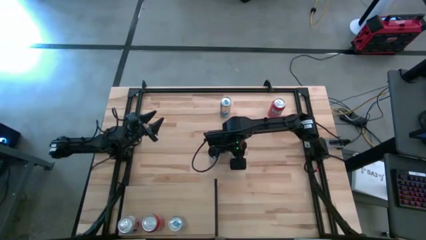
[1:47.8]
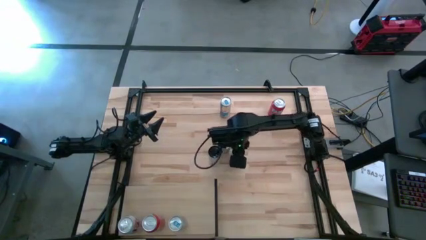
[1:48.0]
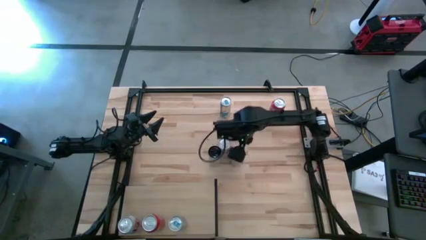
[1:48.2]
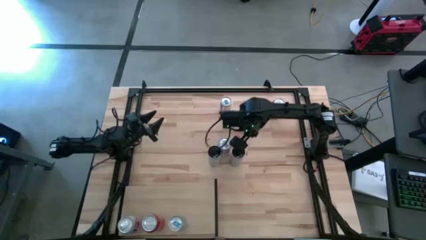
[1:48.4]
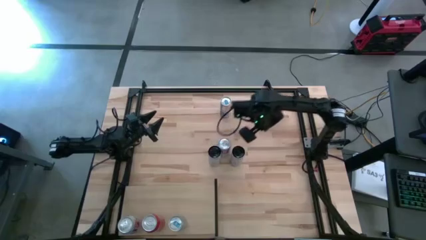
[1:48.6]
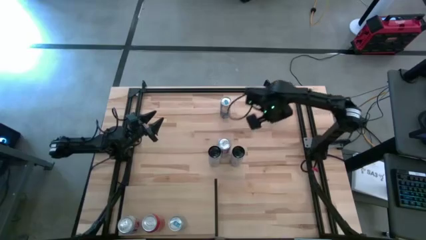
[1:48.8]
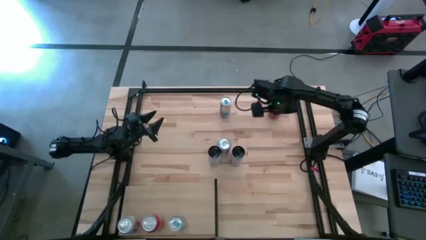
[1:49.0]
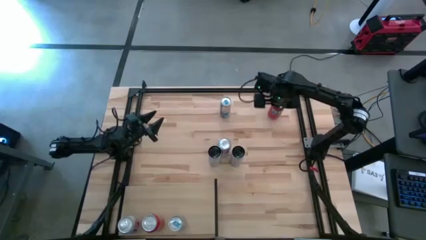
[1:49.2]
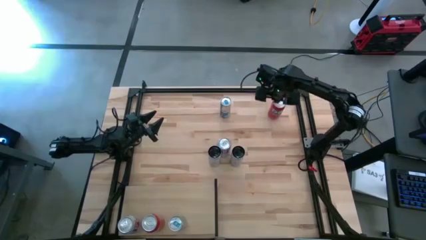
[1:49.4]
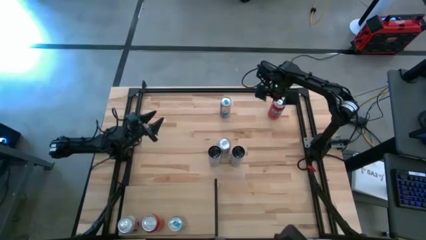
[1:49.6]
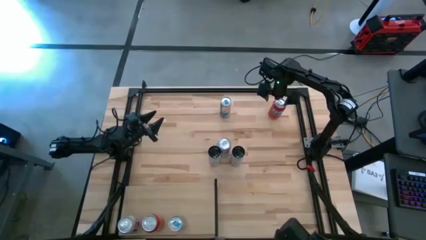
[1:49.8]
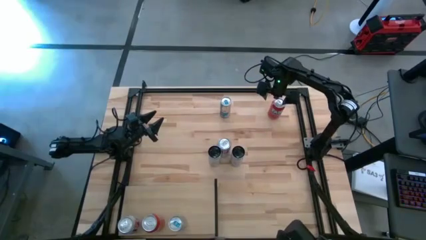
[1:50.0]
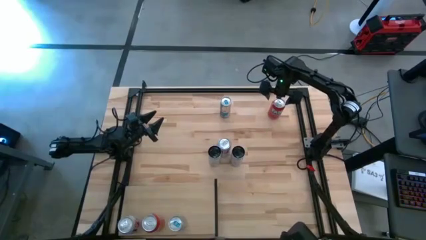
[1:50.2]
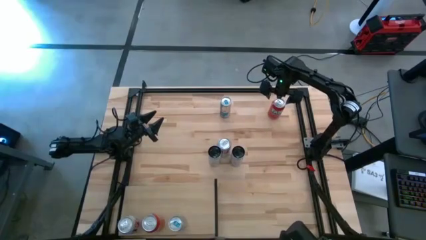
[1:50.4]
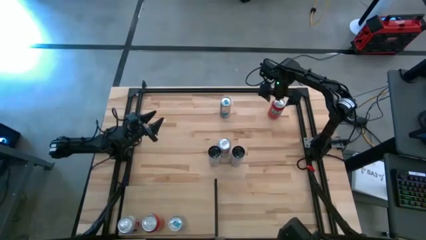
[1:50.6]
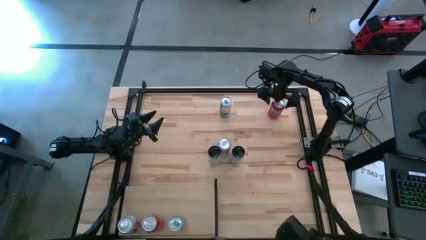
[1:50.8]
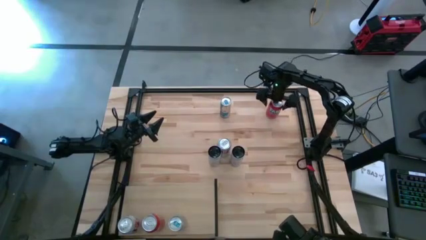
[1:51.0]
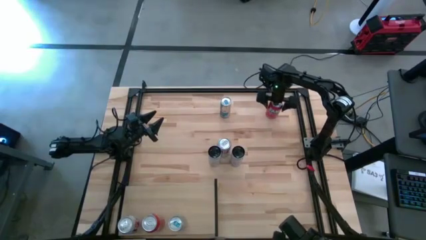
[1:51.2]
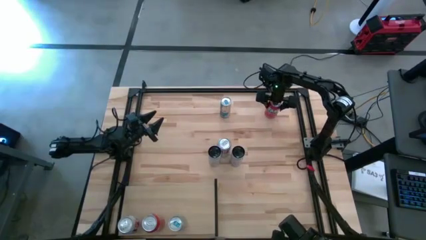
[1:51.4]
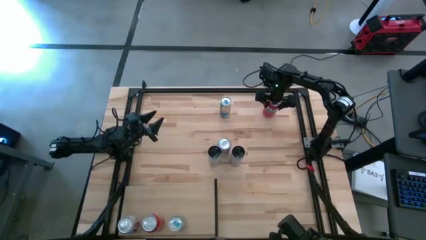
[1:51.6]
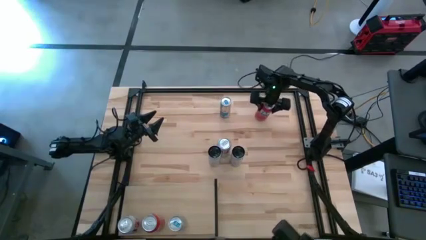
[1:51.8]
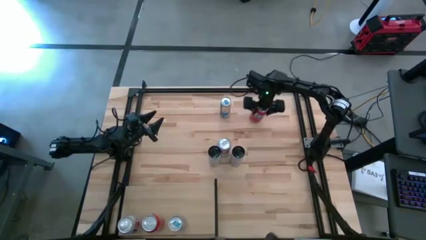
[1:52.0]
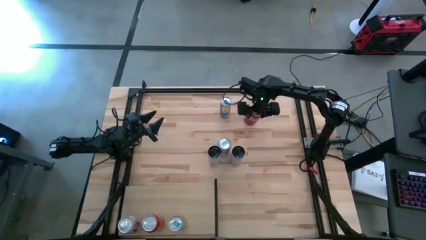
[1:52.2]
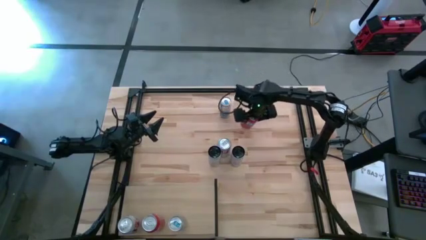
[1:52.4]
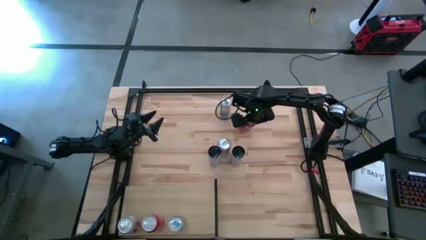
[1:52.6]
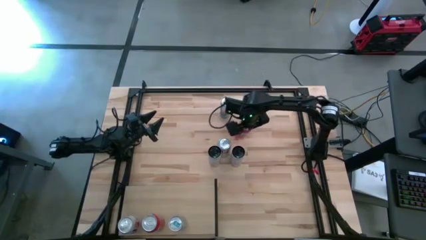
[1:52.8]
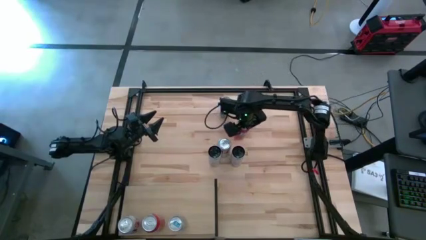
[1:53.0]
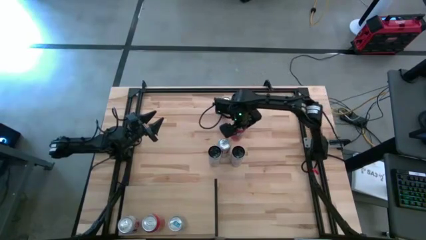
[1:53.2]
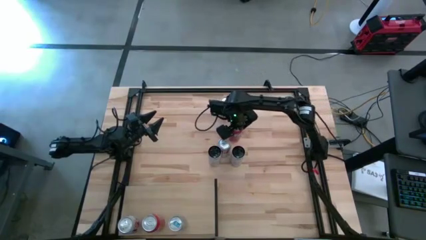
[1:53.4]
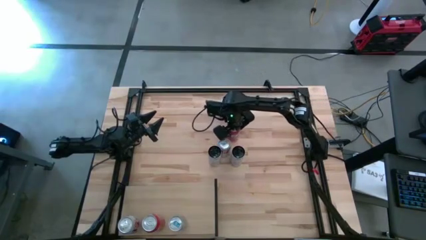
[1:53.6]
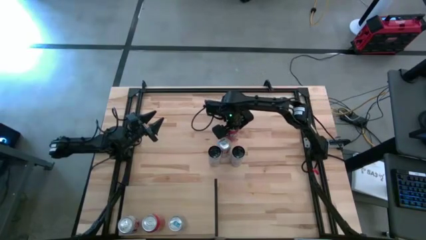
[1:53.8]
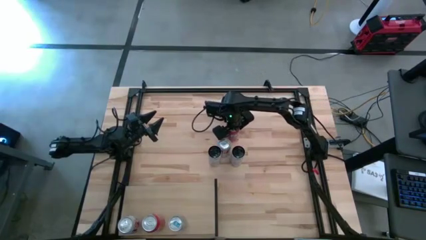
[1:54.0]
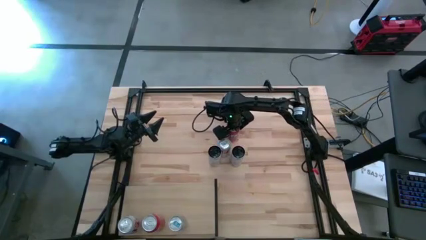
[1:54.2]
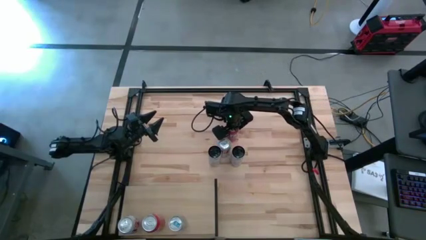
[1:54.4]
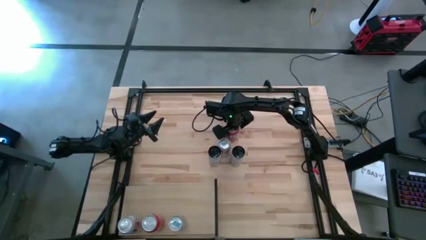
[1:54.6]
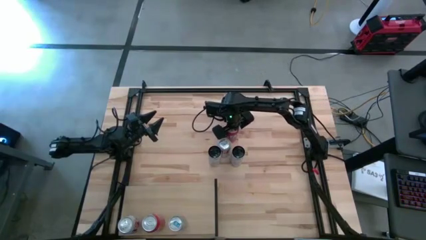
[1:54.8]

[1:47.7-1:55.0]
Task: Place canned beverage on shelf
Move the orange soda can to the center of the table

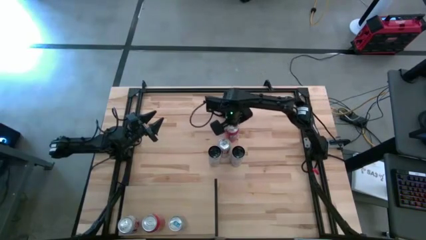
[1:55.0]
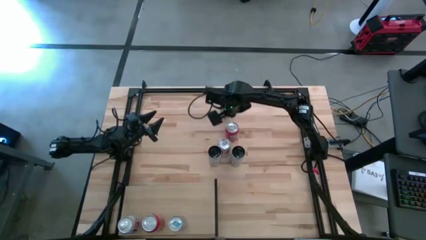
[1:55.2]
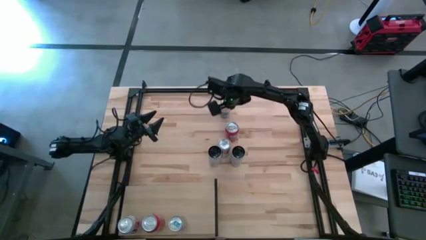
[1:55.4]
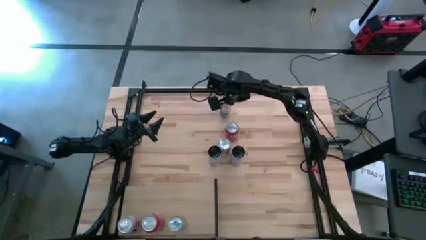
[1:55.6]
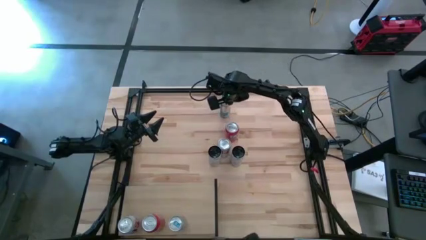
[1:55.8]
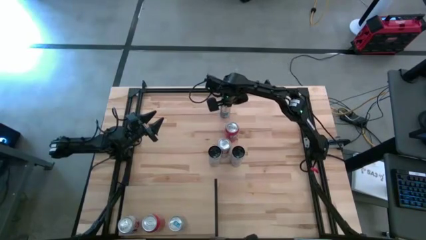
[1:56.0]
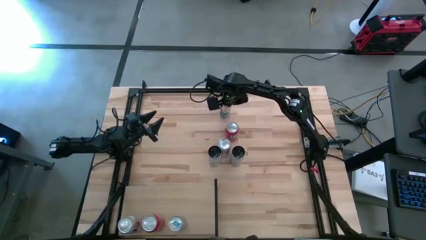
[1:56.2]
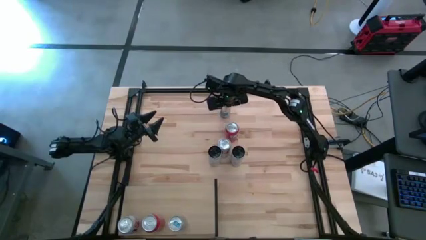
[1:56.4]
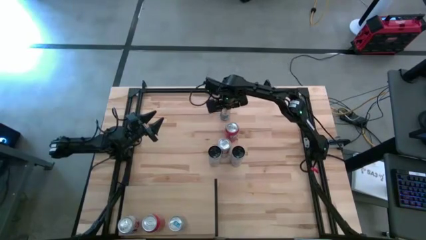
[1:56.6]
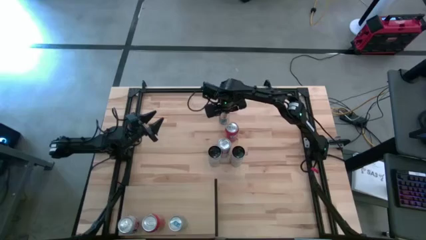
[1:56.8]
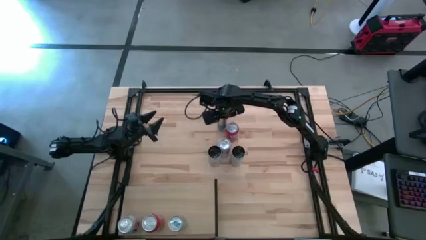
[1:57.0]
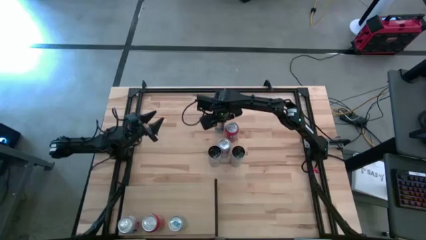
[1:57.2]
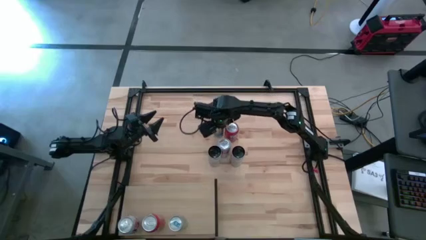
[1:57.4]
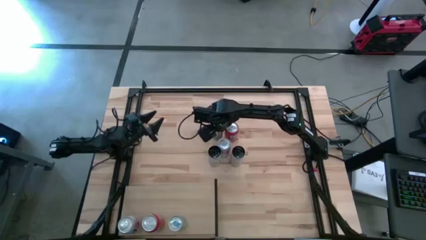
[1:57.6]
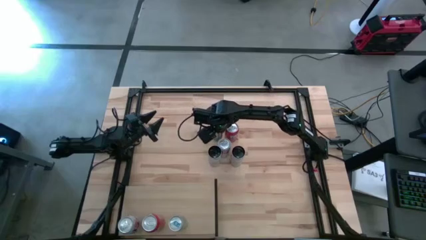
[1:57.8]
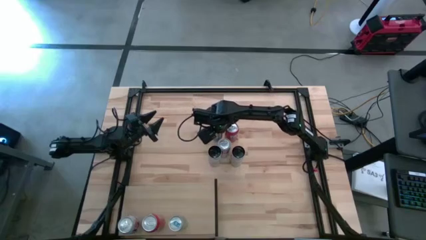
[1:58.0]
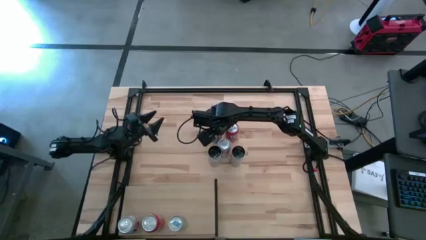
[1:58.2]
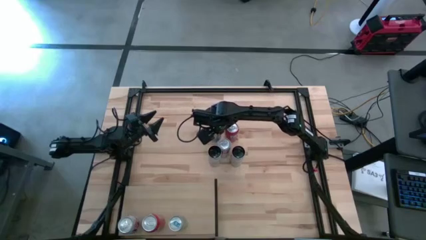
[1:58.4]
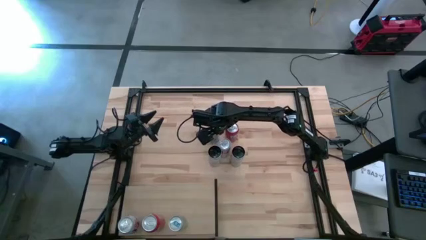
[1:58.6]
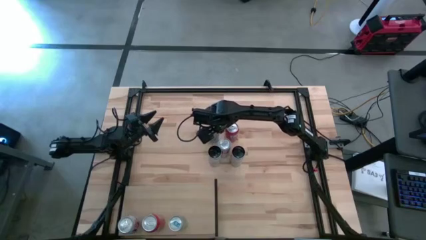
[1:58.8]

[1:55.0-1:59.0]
Move the blue soda can to the center of the table

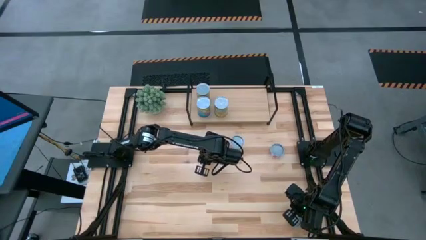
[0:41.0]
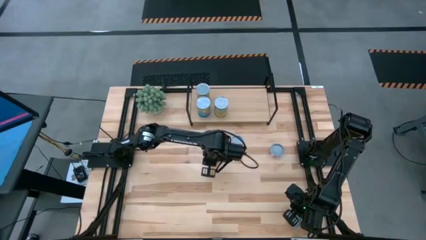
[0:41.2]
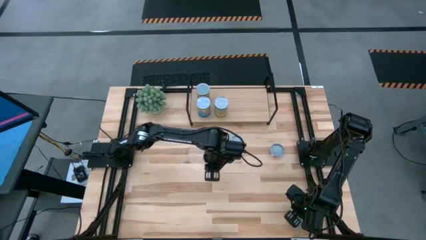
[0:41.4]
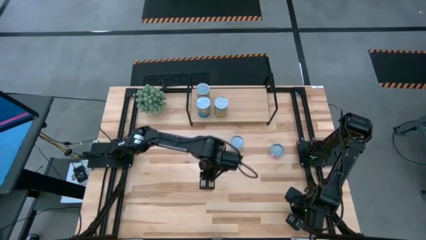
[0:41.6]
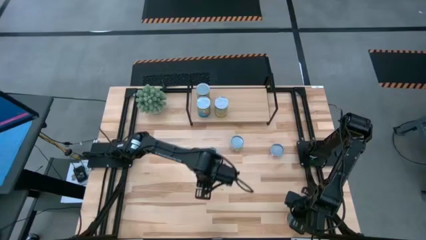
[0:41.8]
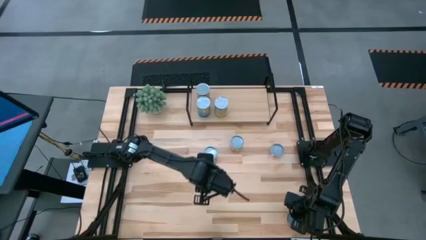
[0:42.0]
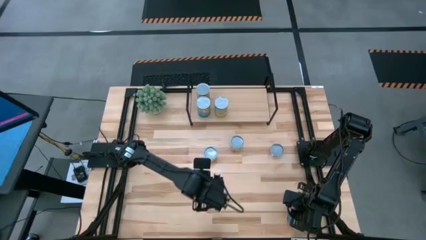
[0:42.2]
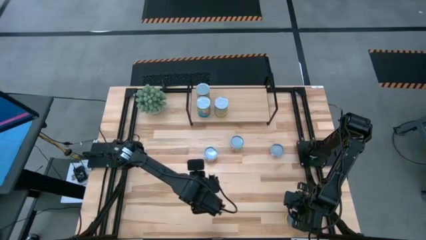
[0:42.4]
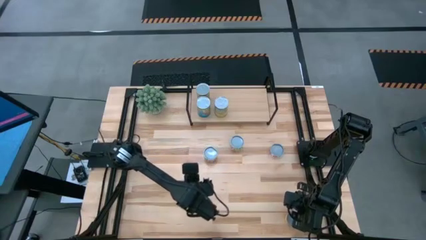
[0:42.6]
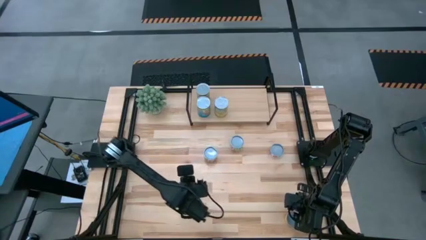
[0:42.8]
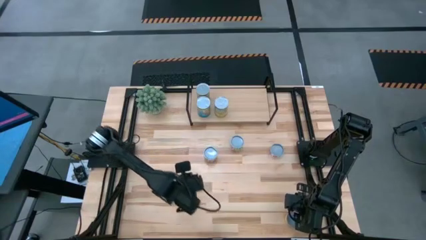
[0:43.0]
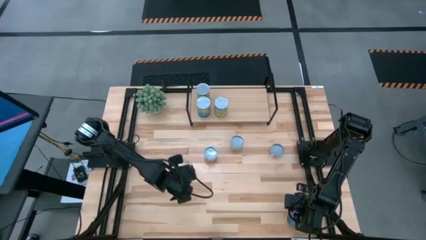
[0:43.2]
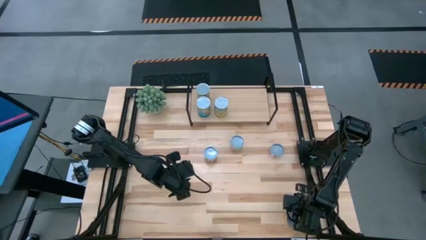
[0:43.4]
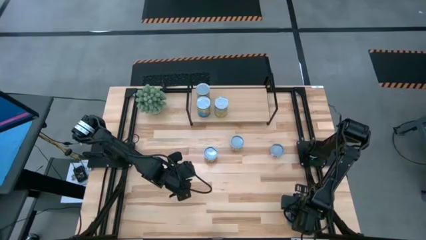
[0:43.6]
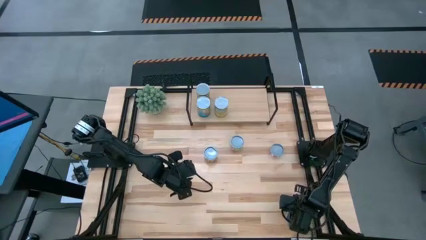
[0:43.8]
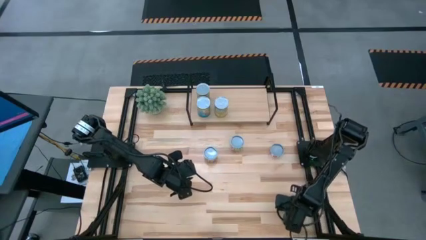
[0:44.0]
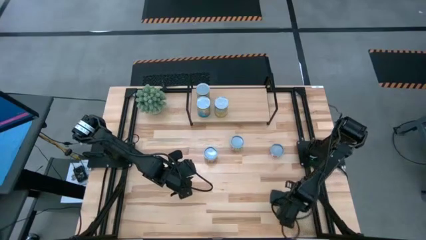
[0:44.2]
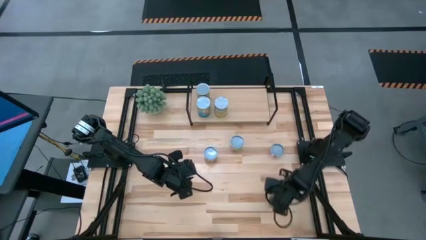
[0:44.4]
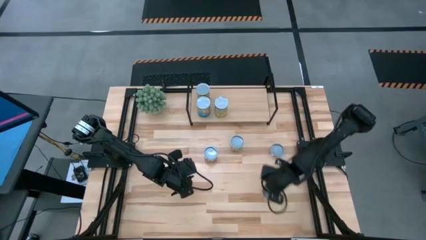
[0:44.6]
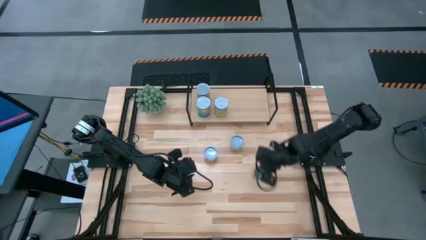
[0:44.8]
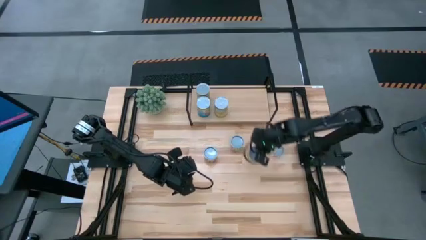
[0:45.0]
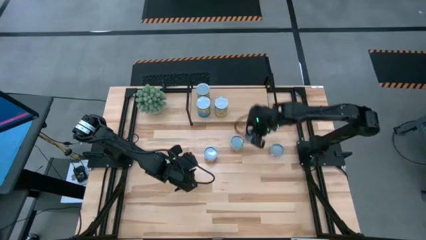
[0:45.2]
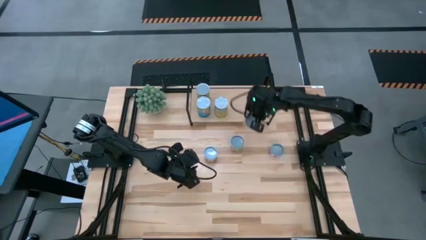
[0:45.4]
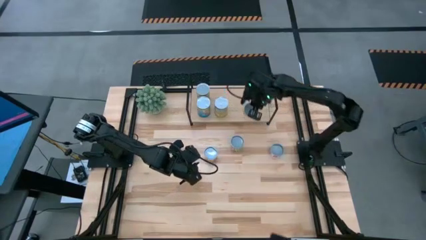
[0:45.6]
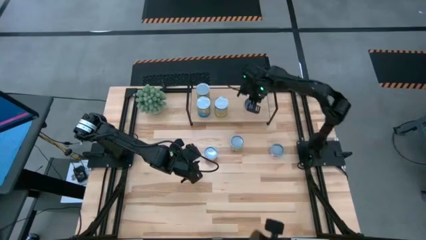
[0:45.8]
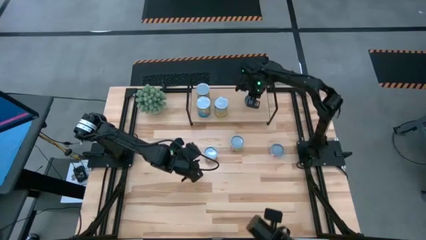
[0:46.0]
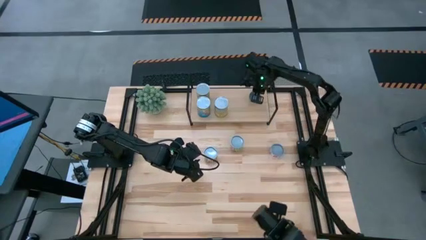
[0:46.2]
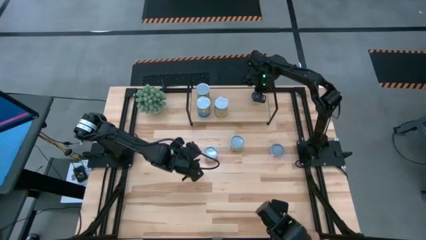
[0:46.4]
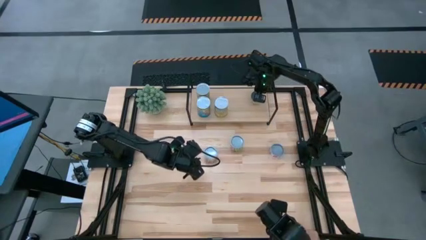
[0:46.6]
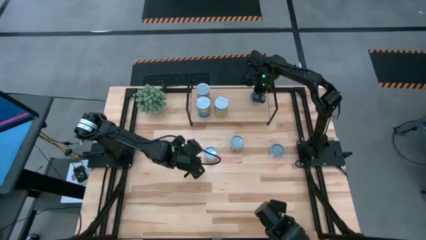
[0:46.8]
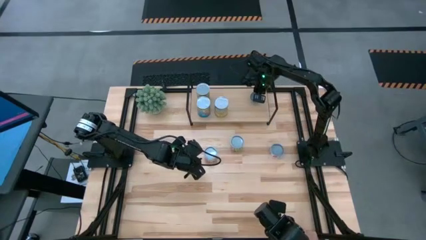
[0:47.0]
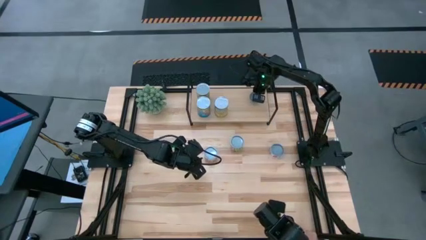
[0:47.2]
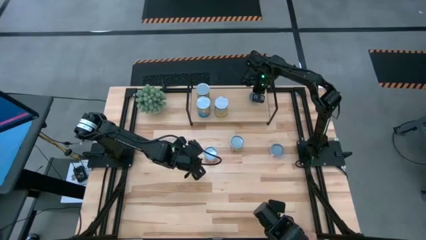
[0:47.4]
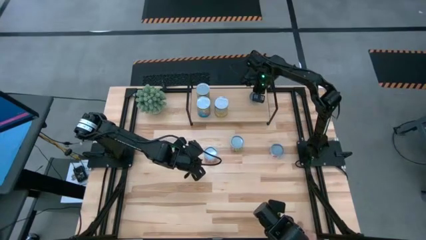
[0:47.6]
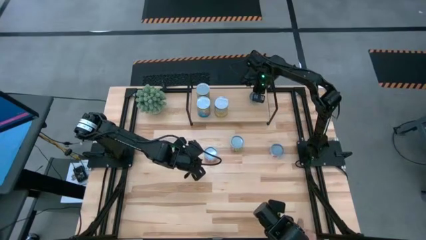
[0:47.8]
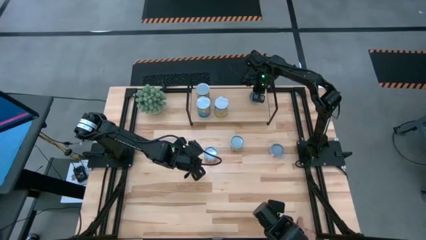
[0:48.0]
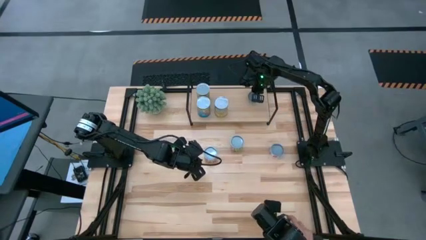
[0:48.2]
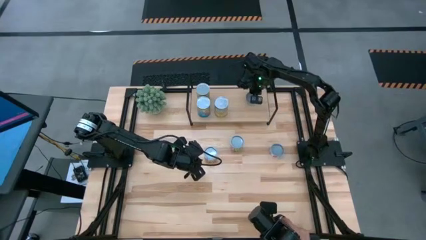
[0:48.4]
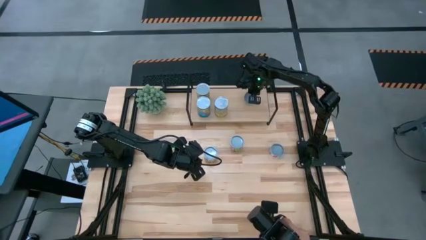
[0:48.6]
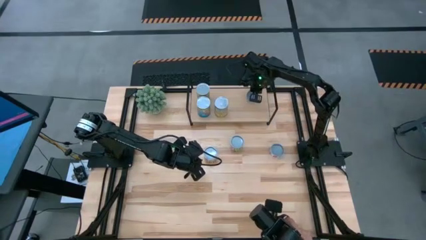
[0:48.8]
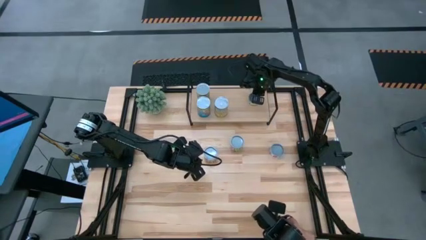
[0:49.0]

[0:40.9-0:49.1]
Task: Pick and place cans onto a shelf
Put the canned mushroom on the shelf
